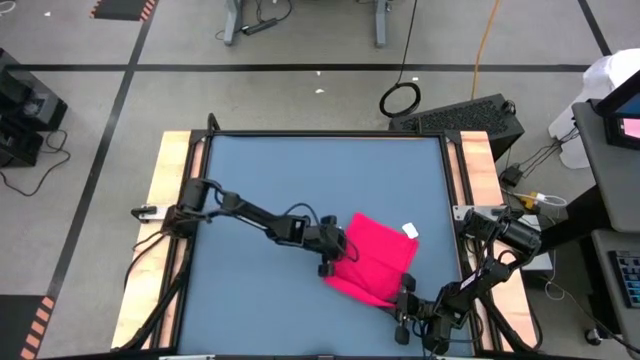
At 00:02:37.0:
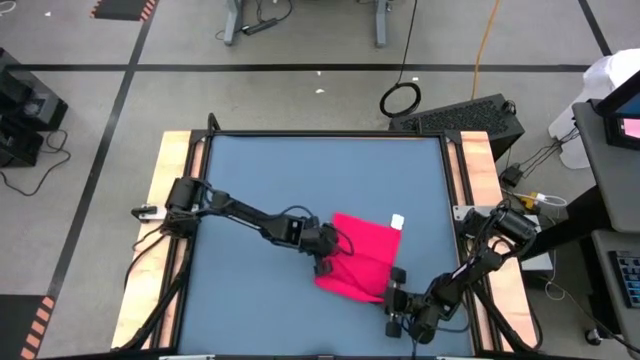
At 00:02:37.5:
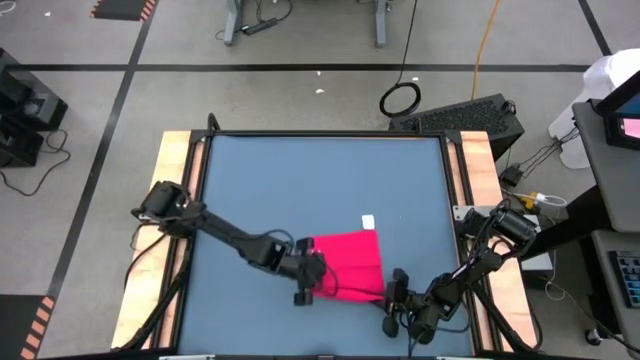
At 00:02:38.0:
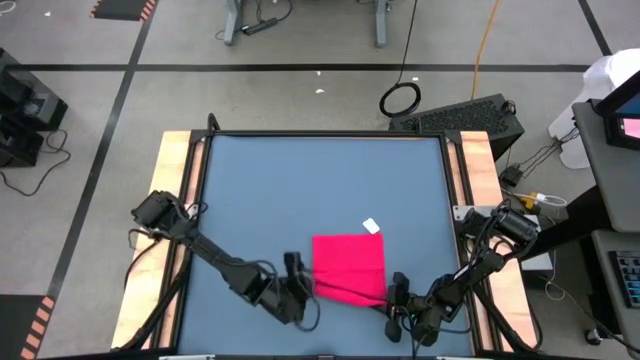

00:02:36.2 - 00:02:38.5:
Task: Roll towel
Roll the red towel

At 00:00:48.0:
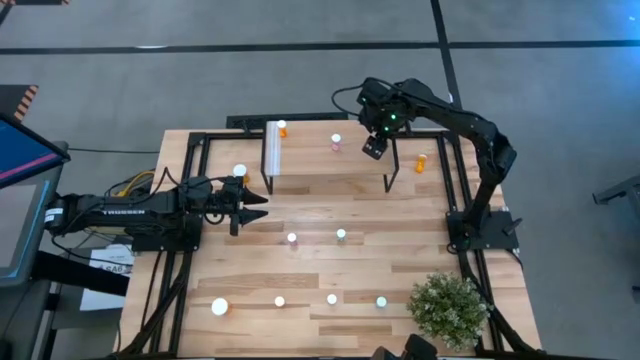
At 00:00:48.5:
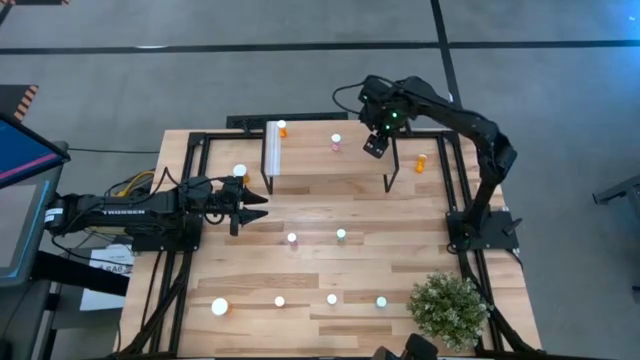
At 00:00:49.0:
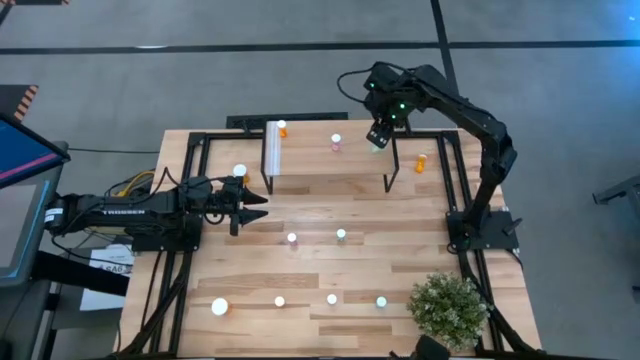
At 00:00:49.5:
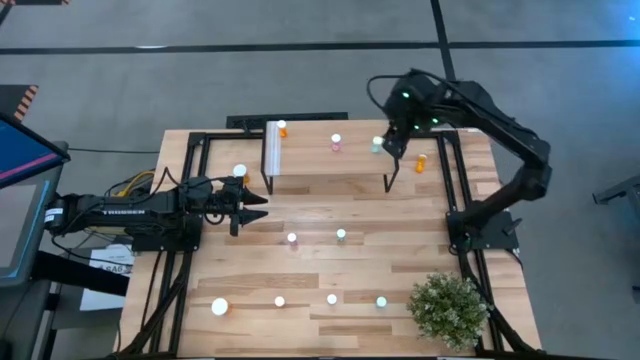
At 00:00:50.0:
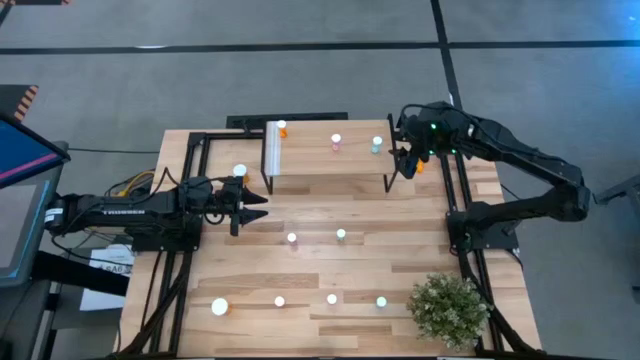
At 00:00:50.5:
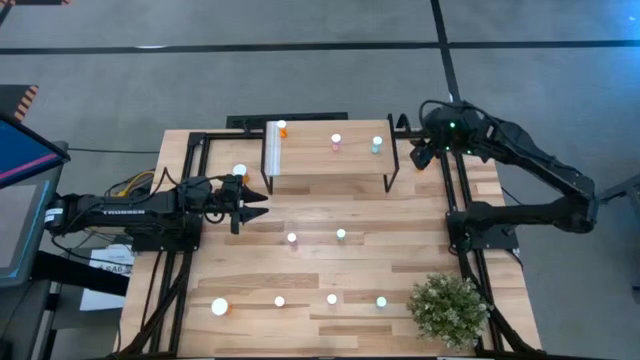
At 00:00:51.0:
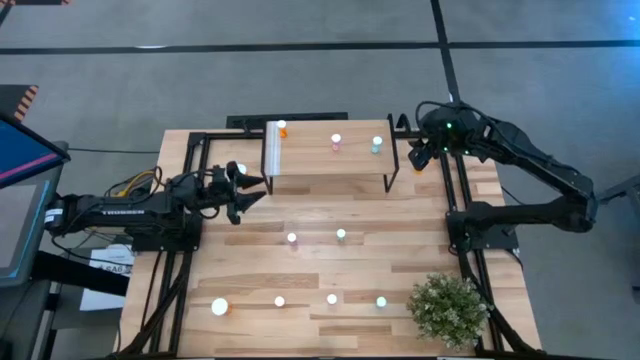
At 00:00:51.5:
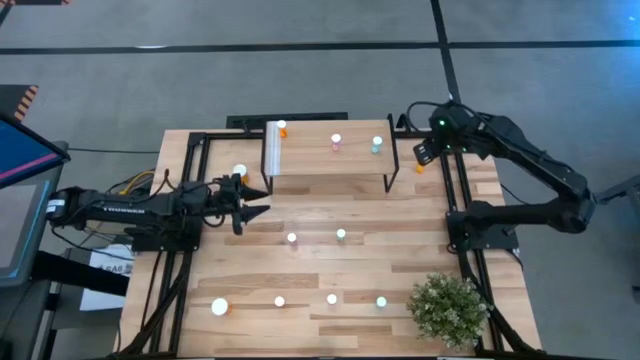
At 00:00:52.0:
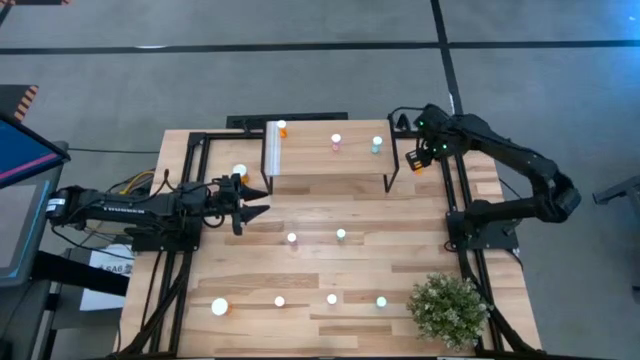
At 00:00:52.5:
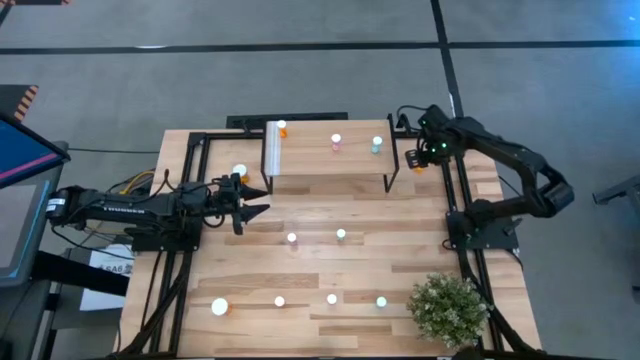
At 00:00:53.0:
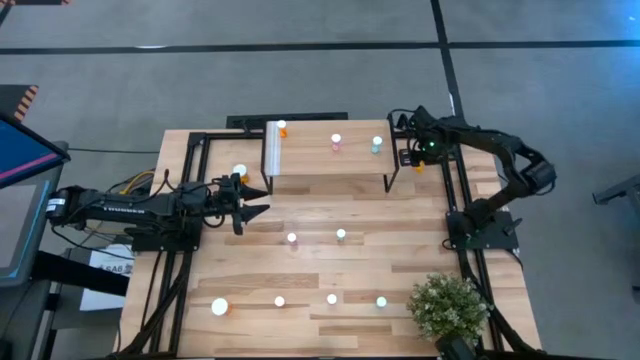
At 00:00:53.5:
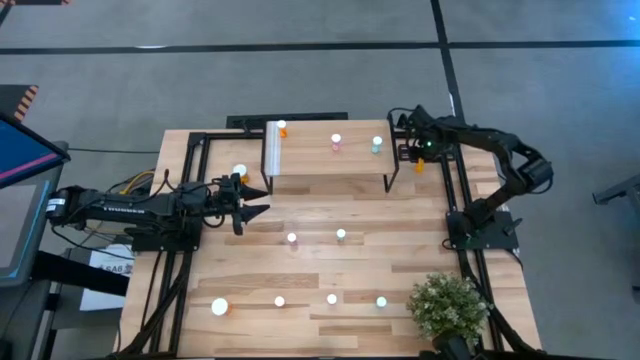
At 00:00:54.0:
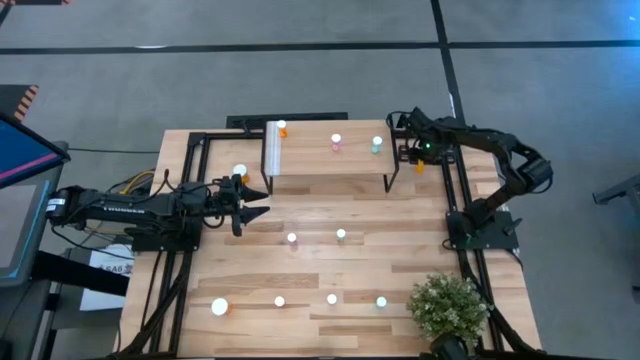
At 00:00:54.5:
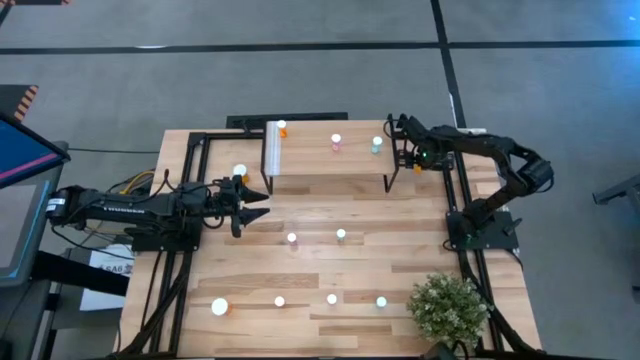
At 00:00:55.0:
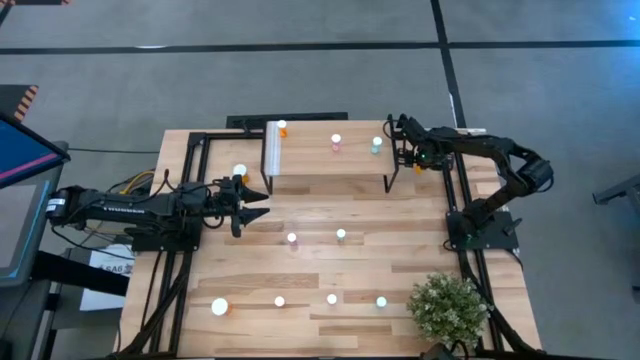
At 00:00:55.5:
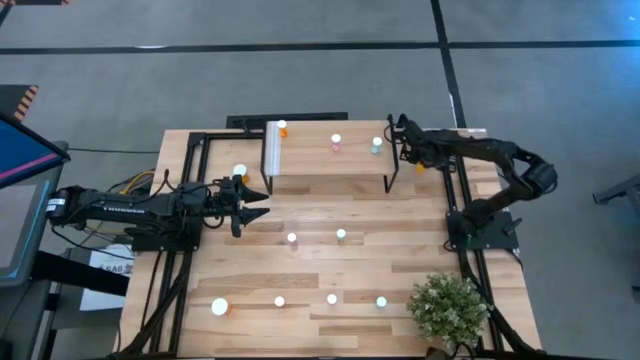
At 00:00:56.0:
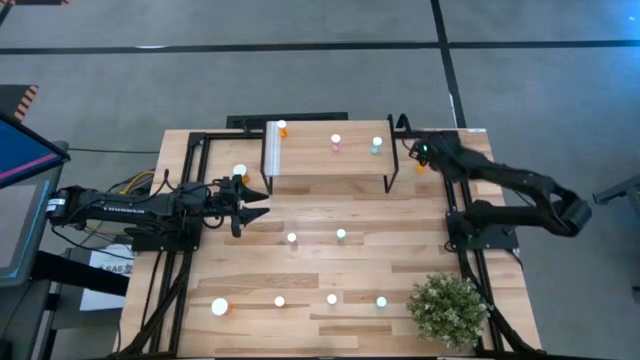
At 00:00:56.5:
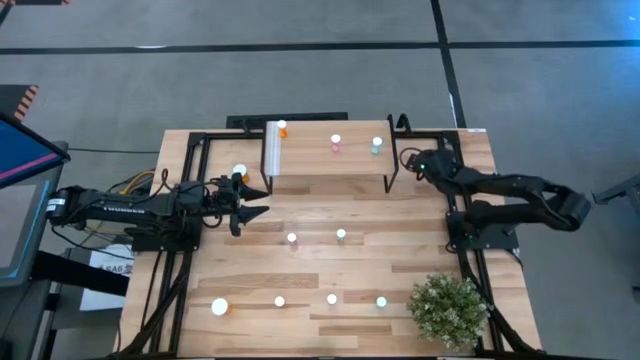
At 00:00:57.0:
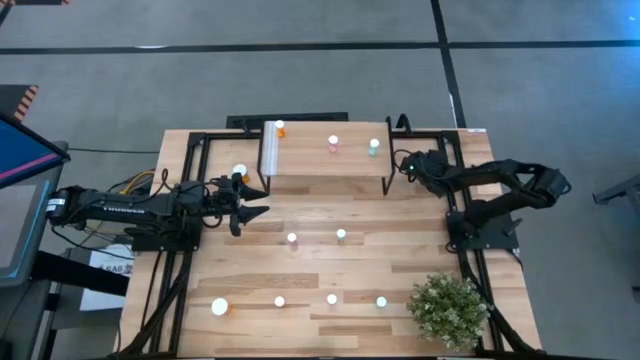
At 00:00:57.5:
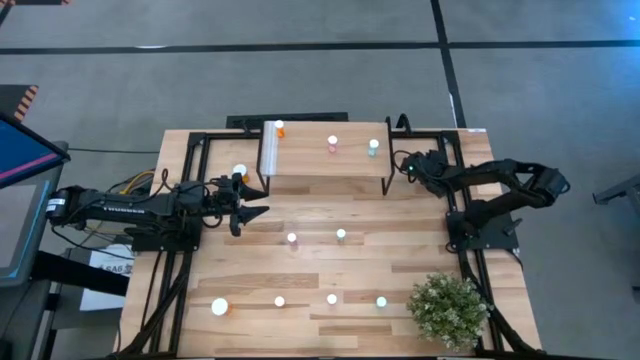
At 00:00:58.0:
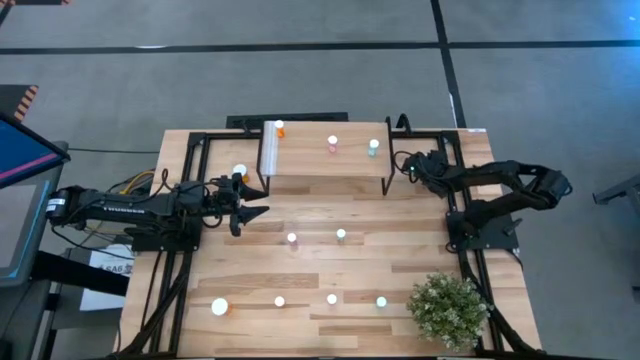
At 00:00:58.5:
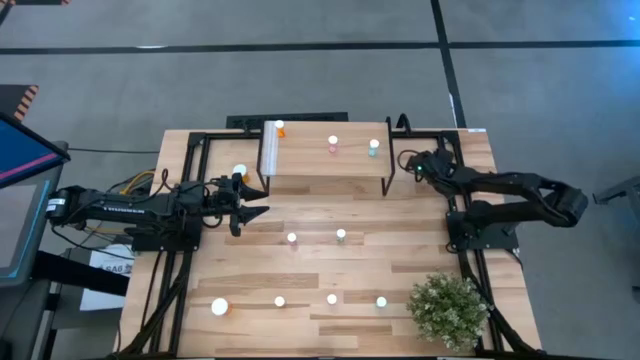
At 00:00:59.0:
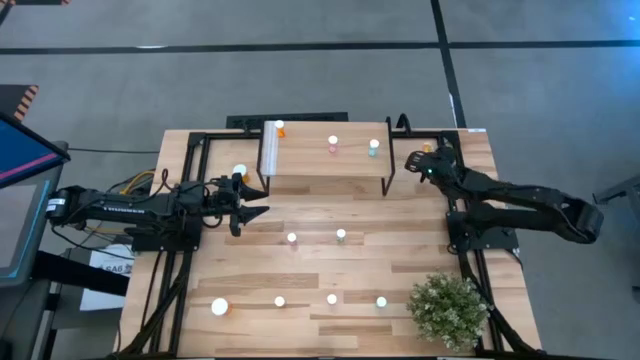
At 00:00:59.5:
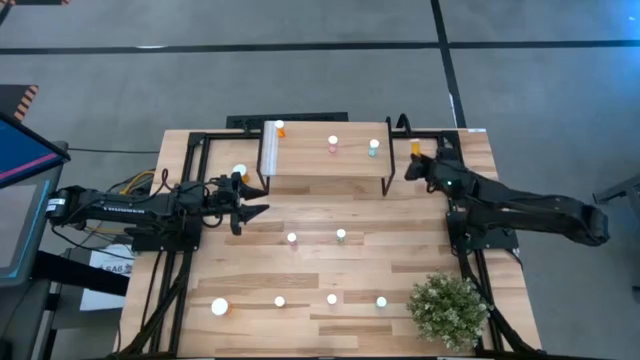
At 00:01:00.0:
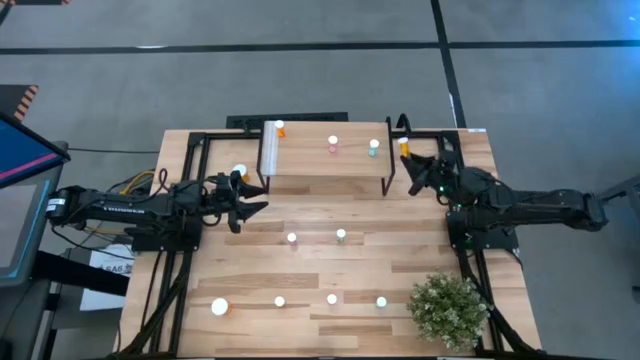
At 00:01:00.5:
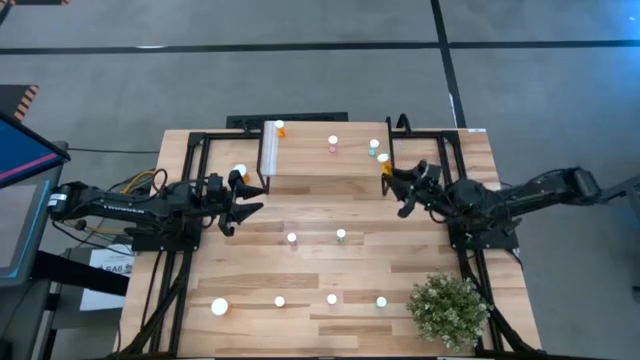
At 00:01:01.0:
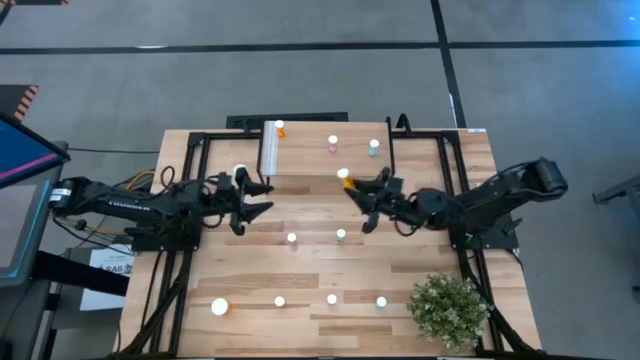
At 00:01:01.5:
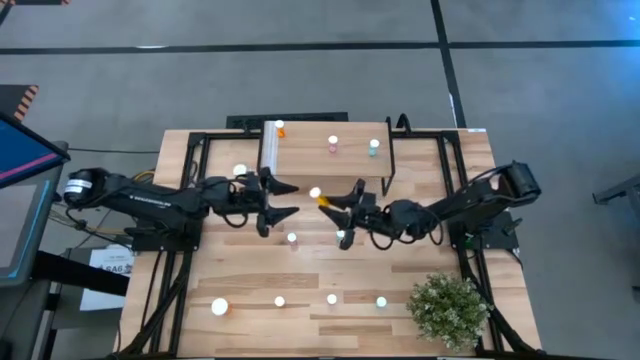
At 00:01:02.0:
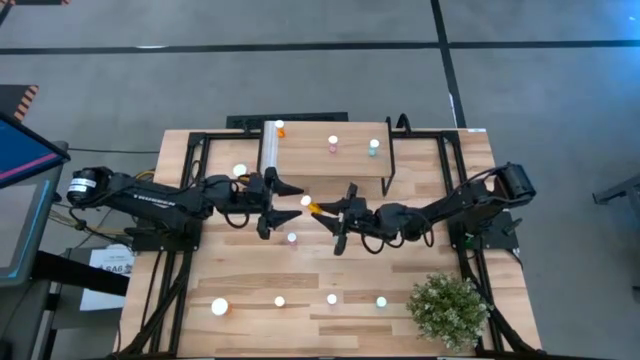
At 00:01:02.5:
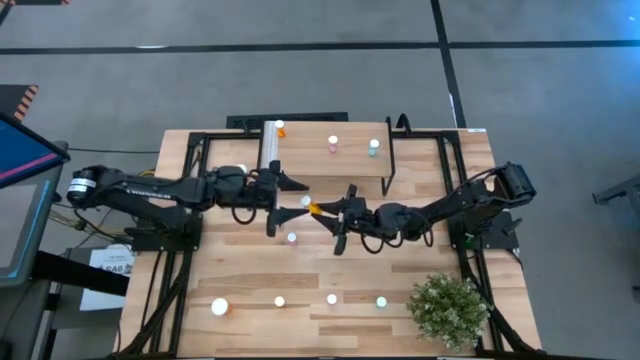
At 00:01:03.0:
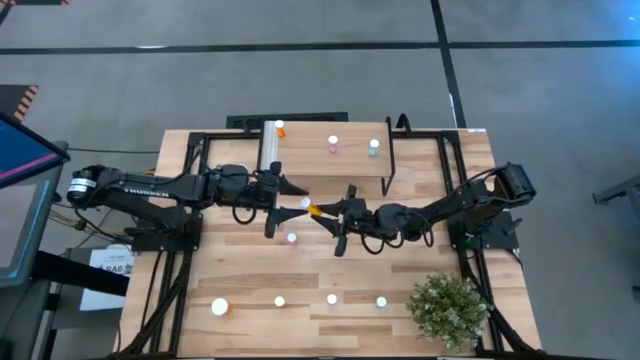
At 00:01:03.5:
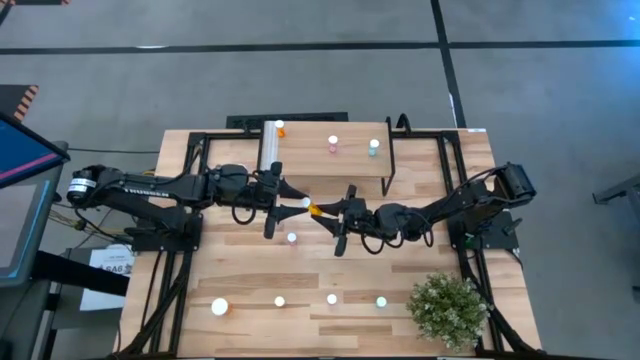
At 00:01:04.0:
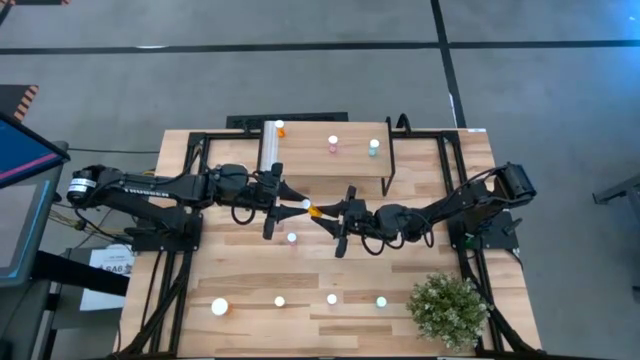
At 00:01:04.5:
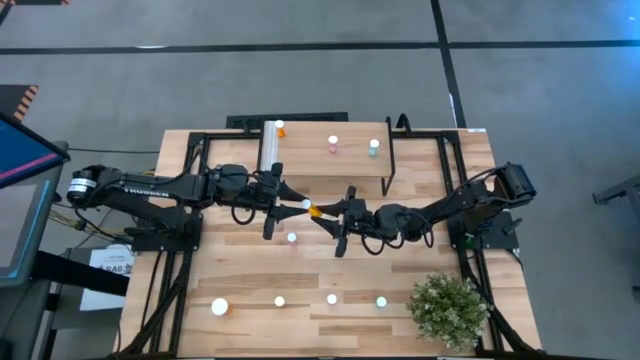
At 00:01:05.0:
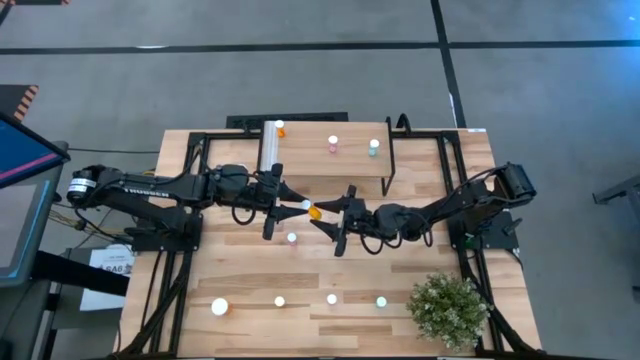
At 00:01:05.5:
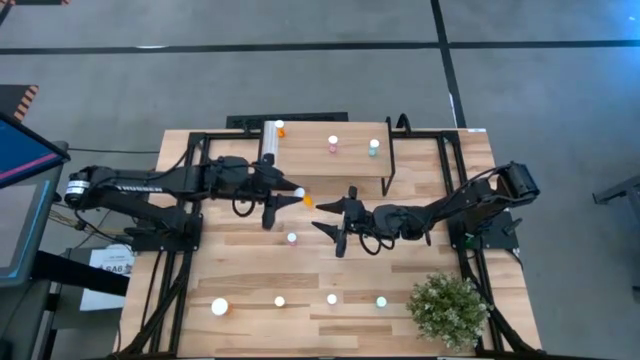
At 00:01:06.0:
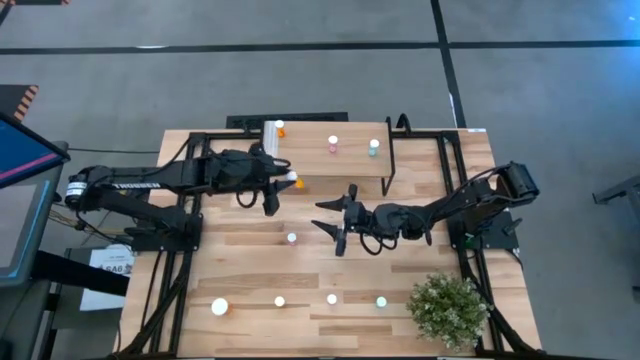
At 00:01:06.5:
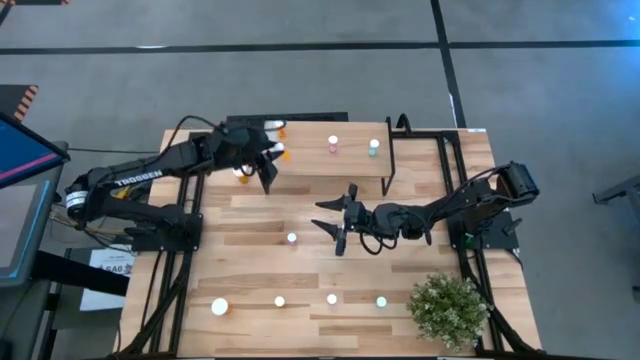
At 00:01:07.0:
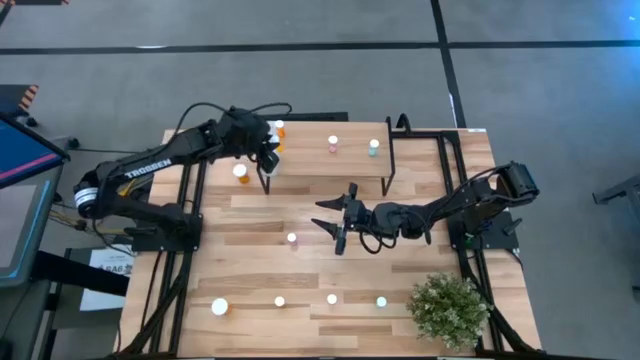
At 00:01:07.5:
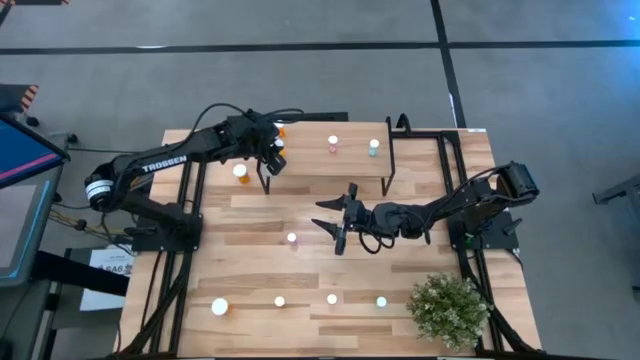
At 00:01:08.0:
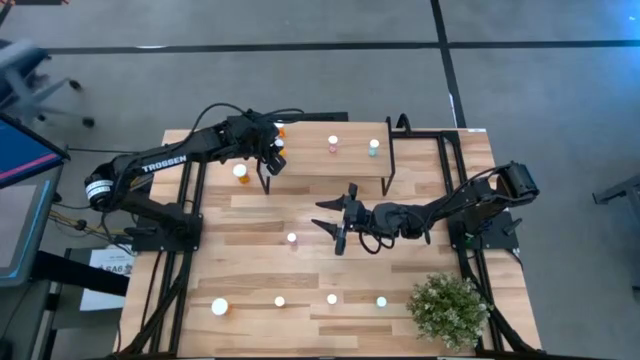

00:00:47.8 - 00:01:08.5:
Task: Pick and place medicine bottles onto shelf by color
Put the top small orange pill bottle on the shelf
